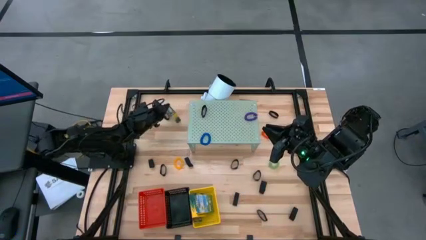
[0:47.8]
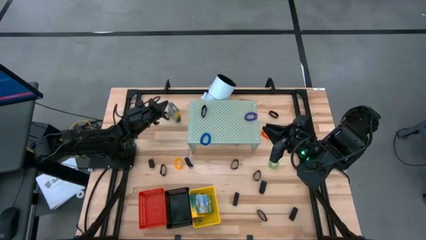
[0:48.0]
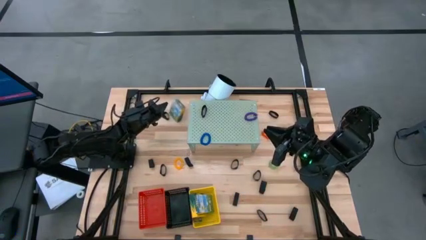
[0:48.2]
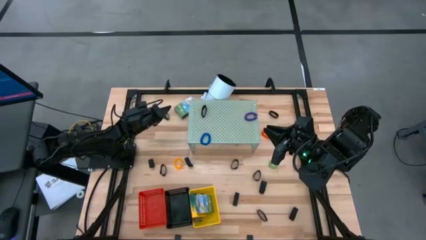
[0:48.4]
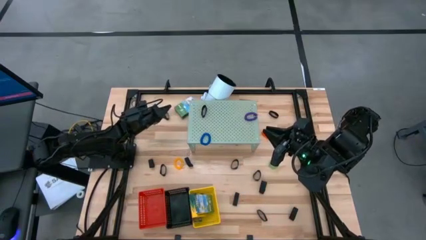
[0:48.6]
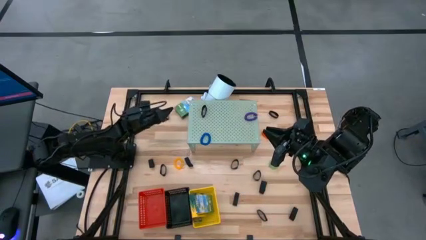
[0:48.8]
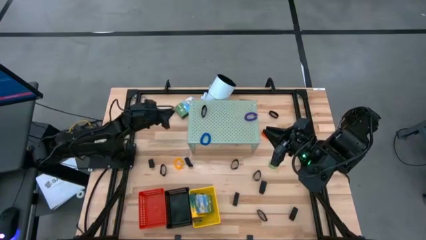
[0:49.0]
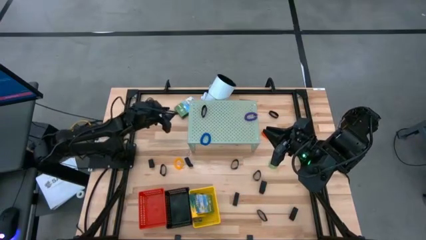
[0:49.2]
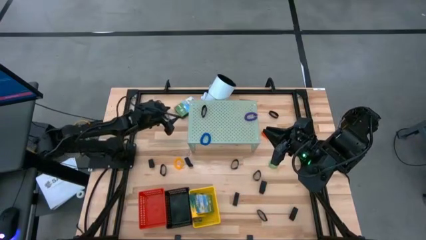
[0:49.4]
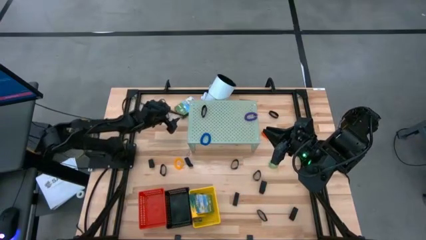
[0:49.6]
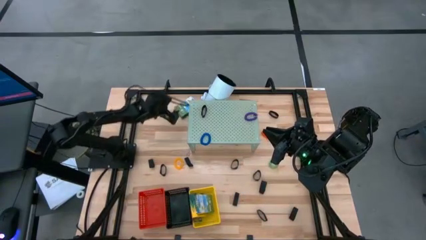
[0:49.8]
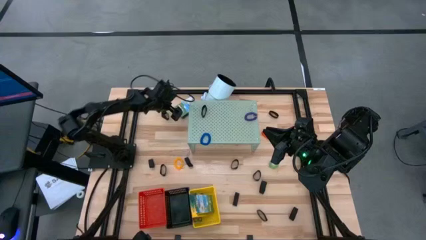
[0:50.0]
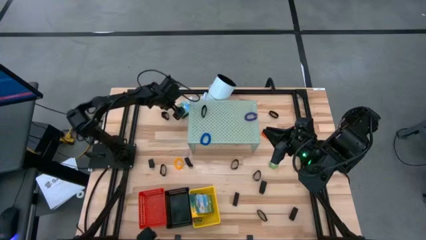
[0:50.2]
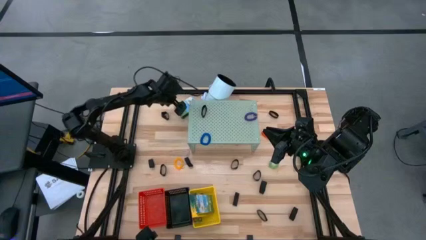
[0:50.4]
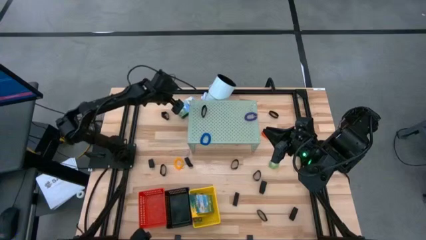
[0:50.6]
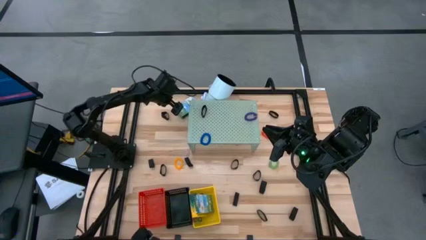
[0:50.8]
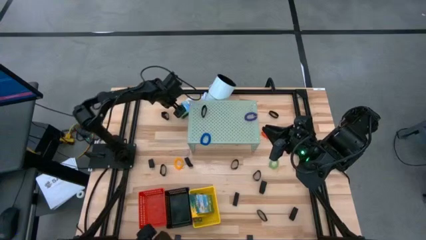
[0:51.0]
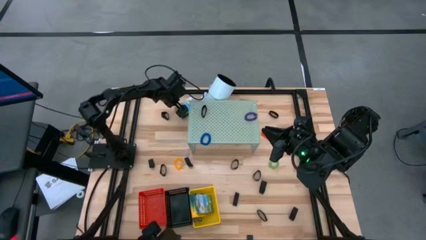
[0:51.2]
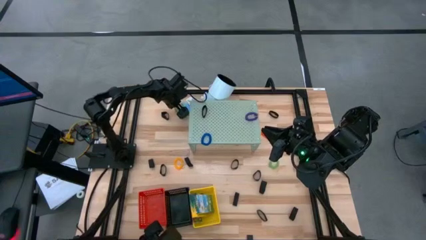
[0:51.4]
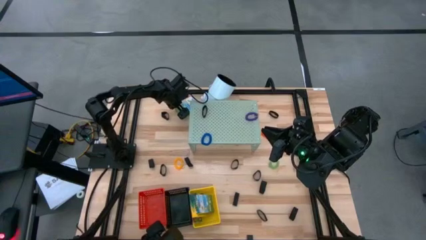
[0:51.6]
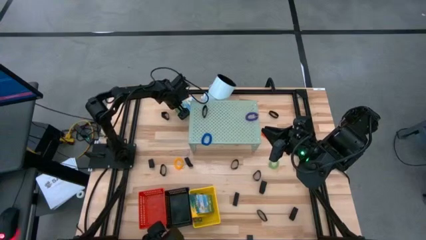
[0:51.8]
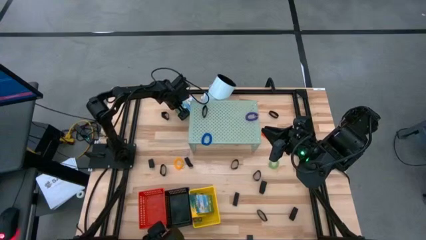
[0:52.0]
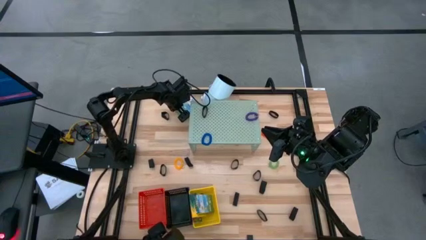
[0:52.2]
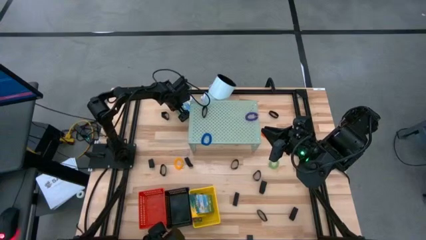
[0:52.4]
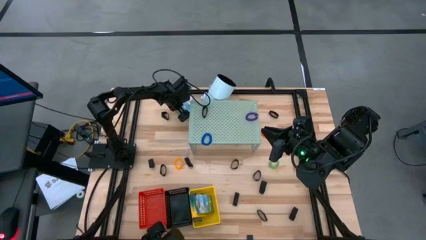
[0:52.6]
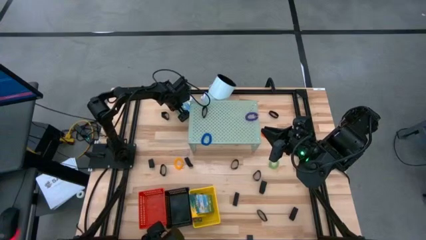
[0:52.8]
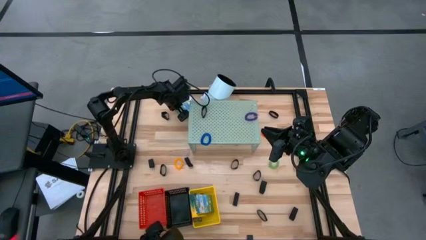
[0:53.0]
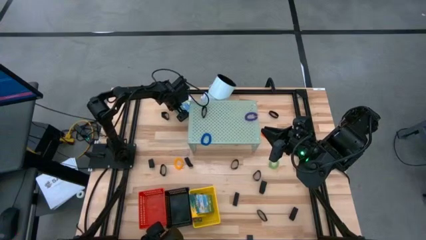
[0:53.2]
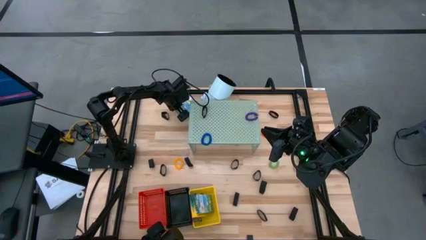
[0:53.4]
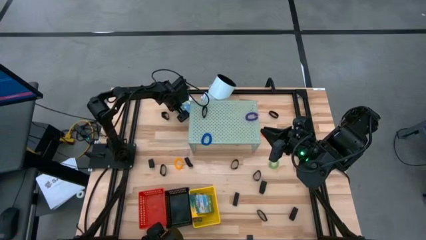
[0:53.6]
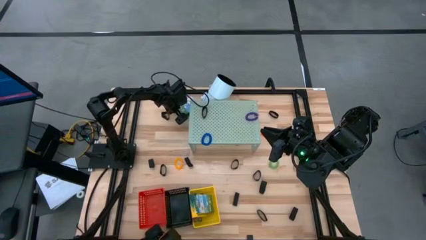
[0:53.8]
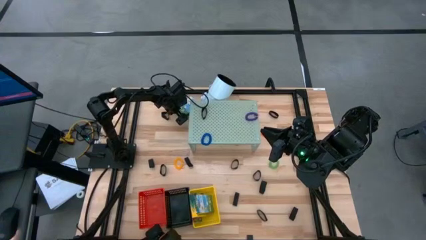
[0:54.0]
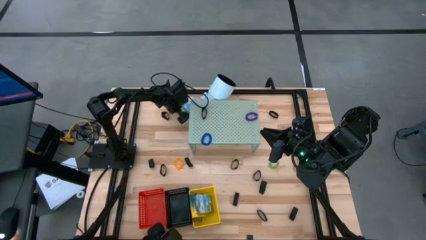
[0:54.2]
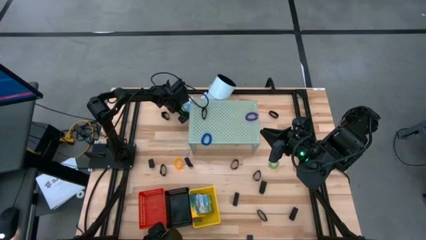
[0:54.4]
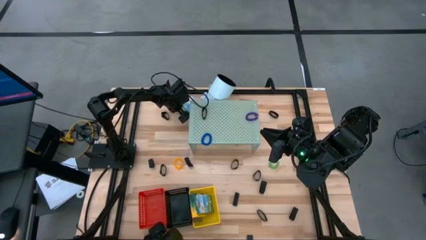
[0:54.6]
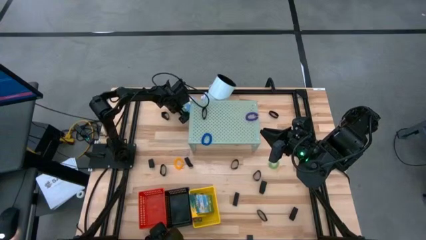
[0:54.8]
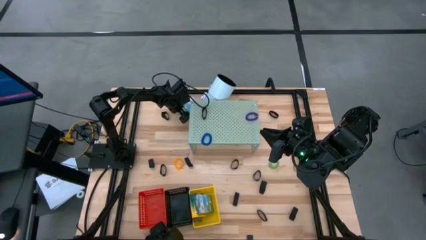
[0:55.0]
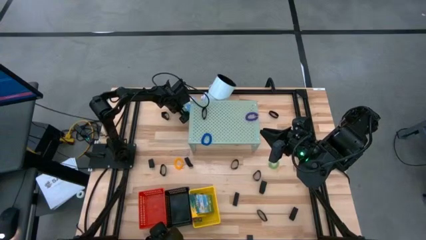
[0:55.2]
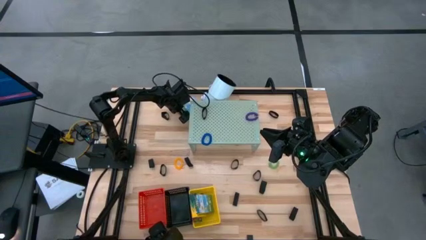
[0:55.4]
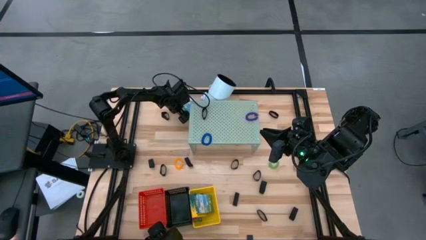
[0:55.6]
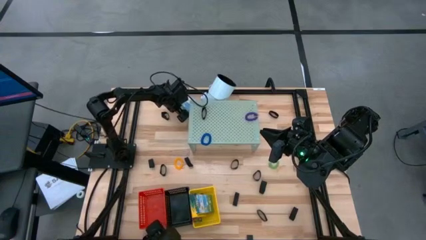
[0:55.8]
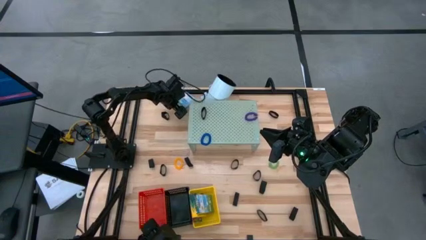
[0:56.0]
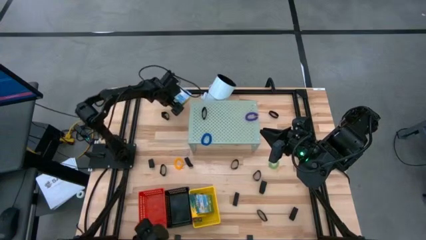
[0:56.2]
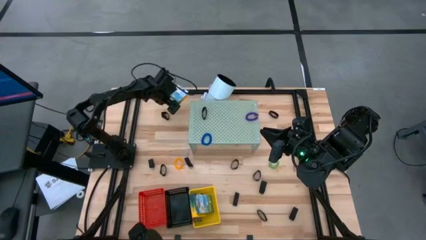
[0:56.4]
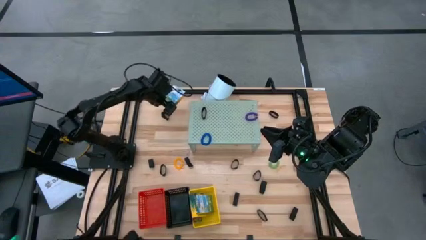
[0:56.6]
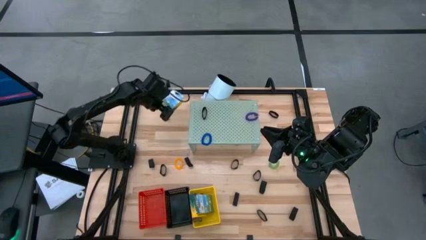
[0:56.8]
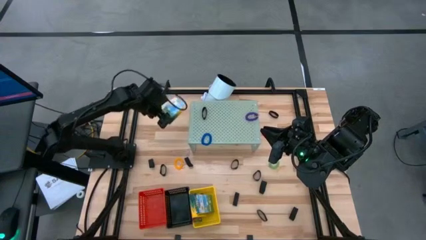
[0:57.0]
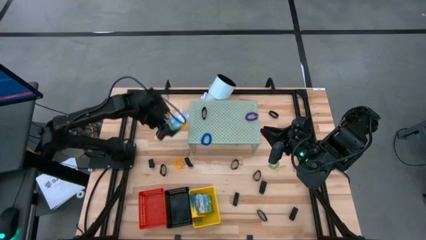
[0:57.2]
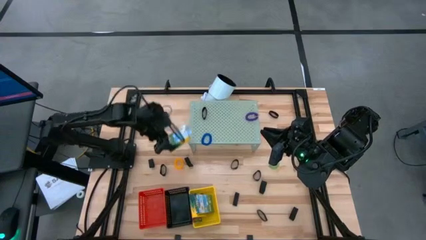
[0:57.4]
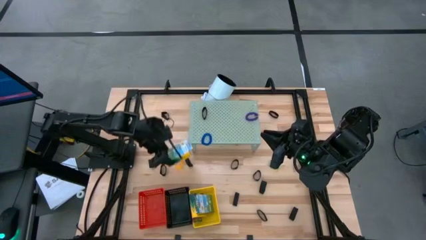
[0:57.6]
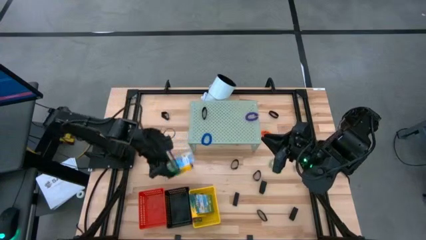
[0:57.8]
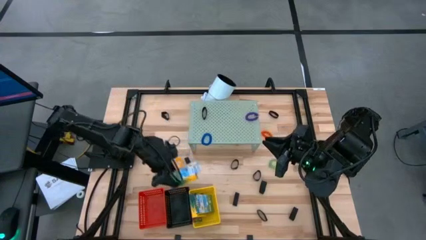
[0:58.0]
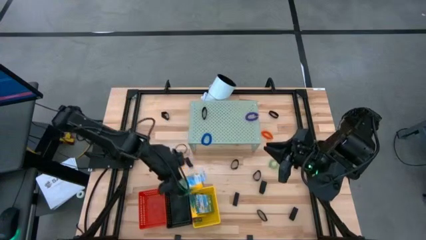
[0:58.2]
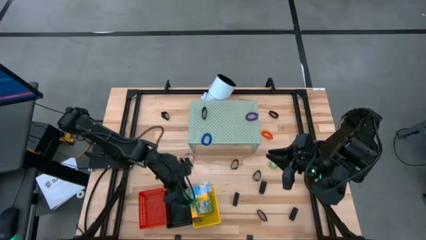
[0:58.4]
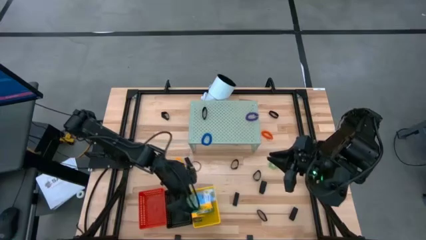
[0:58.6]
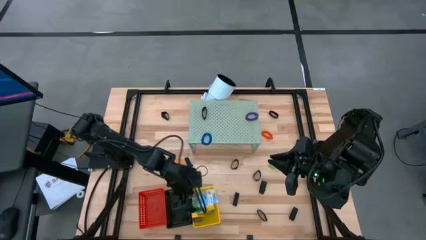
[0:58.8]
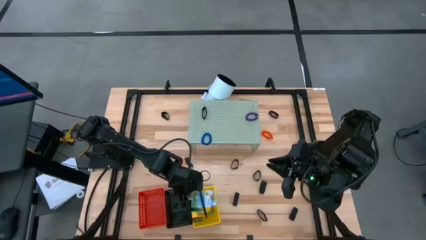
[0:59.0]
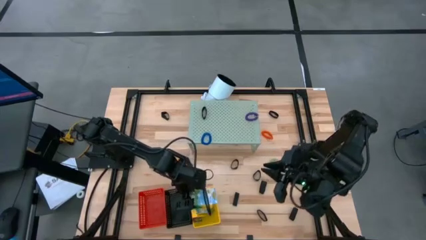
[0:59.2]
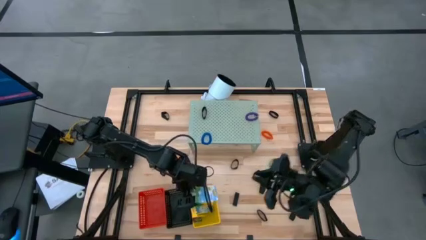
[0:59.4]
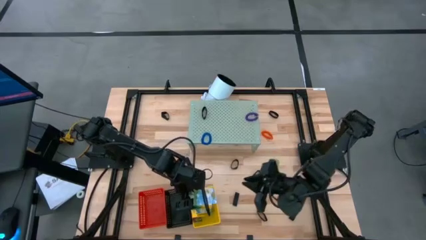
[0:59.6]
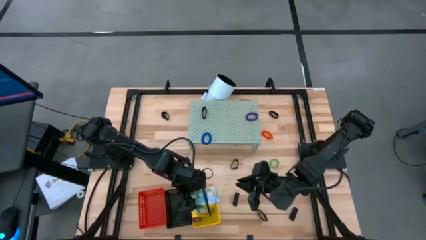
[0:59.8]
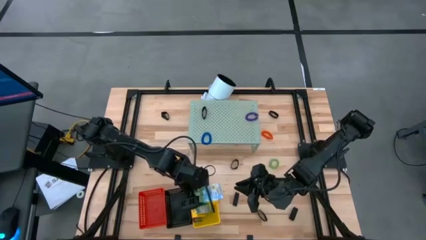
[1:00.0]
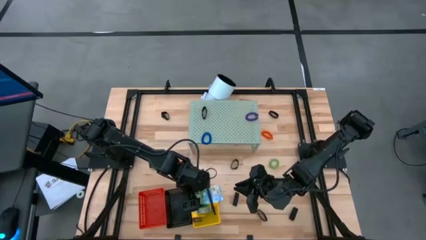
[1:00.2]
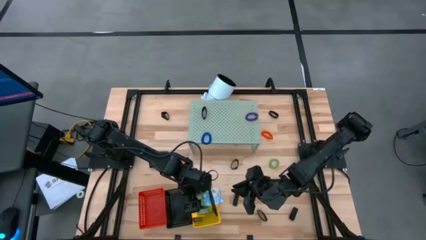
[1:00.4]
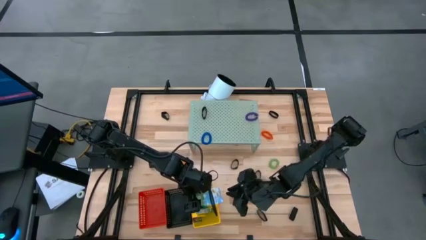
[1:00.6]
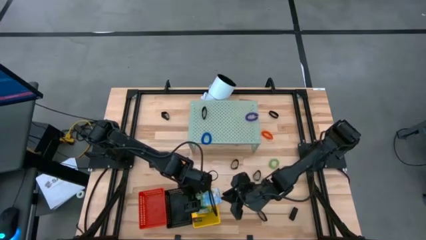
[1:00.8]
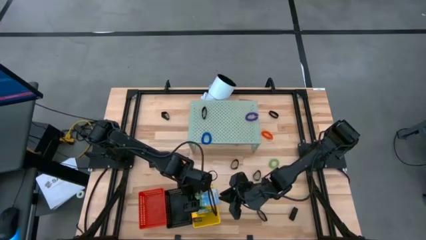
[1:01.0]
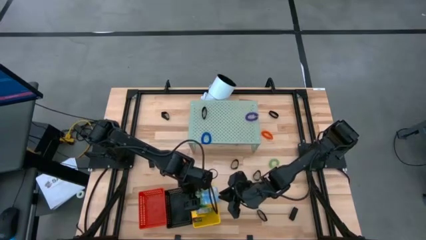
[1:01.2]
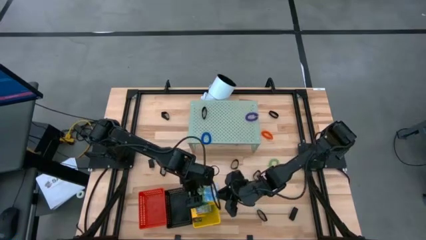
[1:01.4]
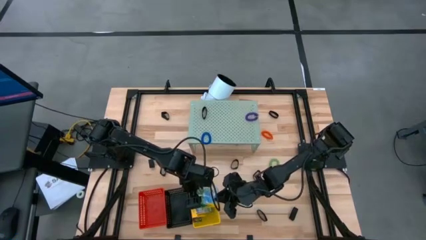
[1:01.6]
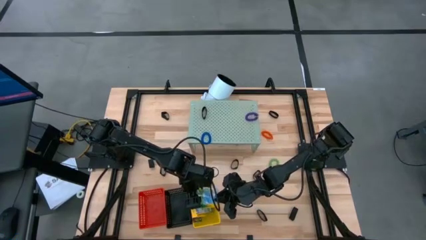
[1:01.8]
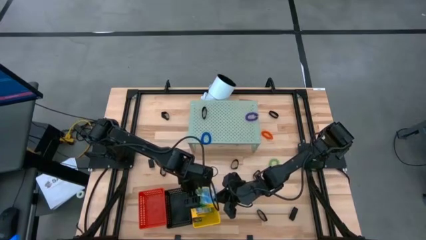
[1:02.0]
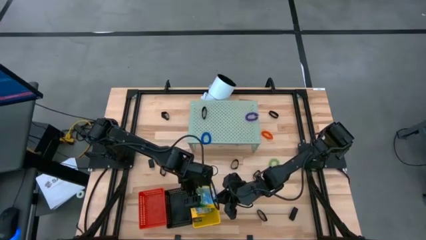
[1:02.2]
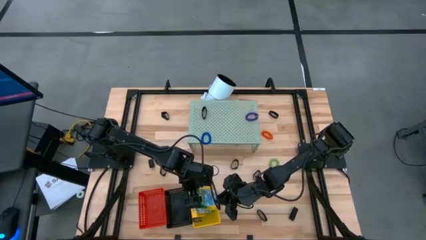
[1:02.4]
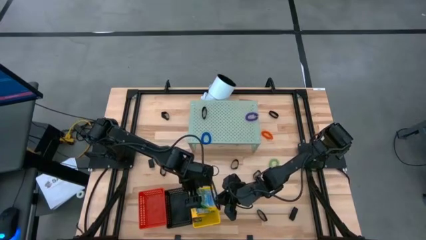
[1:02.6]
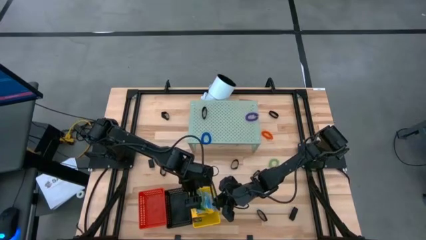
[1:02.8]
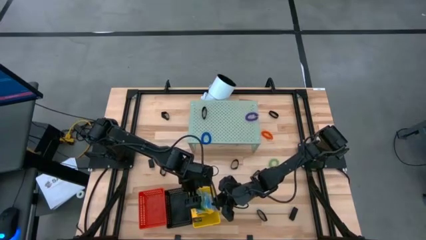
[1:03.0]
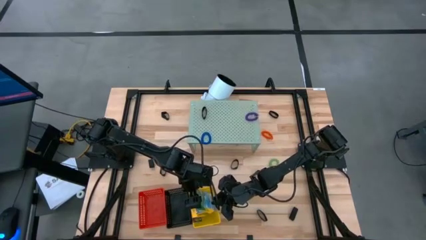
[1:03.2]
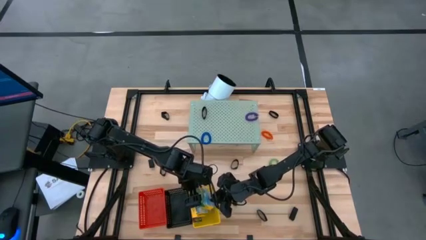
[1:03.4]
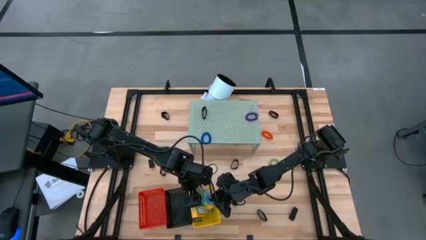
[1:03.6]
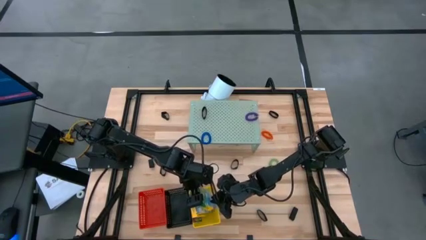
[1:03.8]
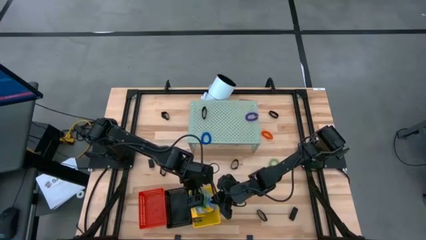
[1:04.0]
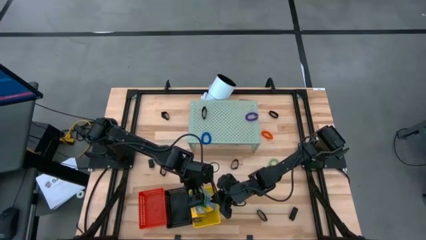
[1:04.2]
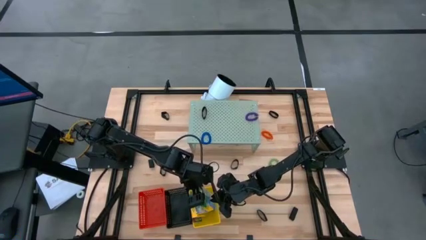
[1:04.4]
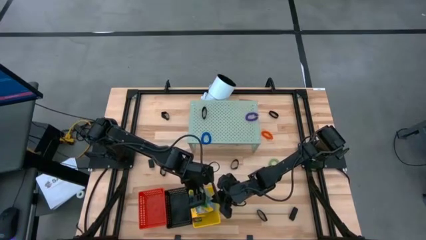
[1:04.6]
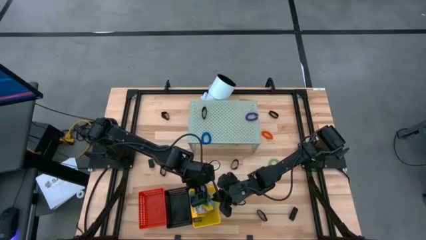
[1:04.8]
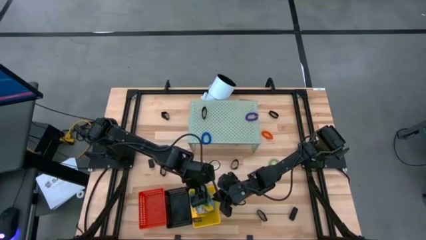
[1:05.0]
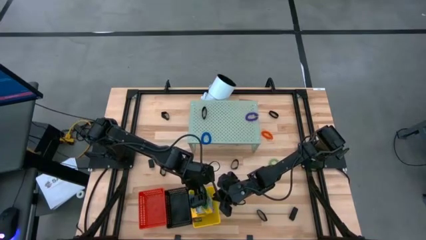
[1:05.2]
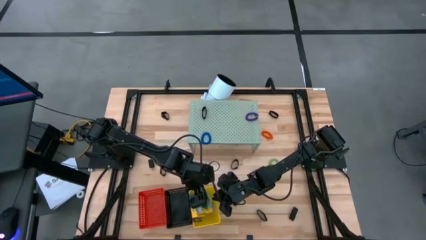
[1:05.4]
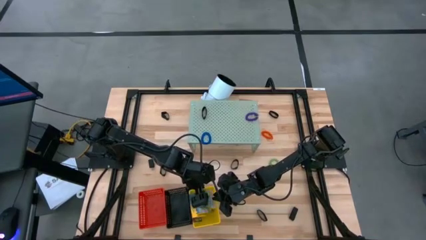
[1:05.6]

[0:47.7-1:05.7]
Task: Pick & Place Office Desk Supplies
Put the yellow crayon box into the yellow bin
